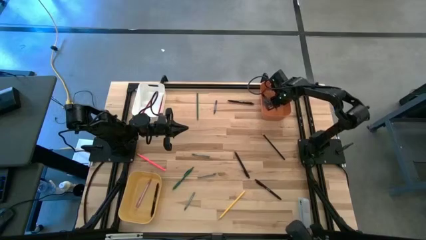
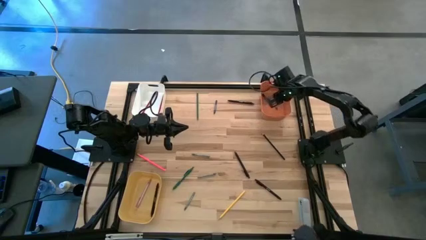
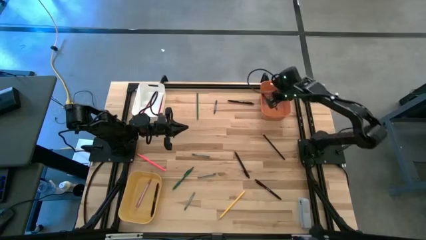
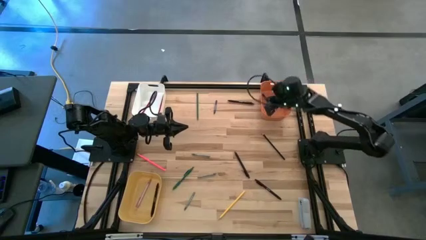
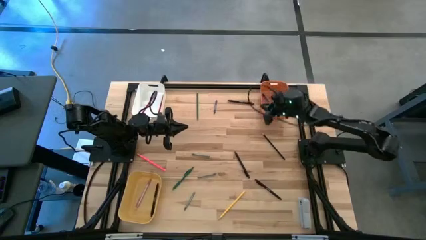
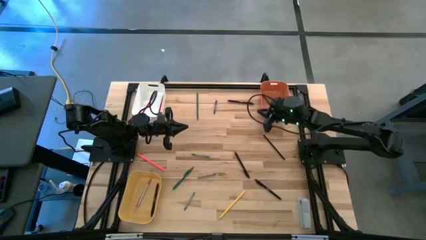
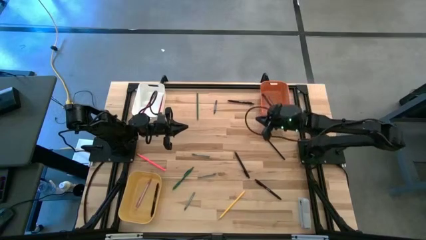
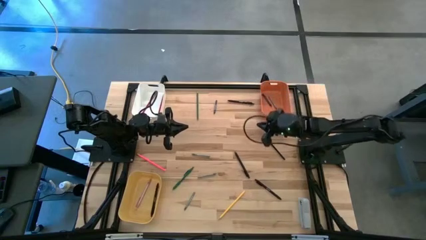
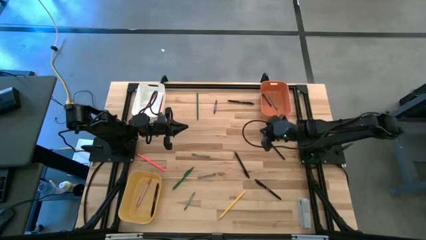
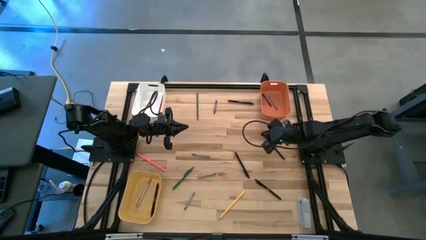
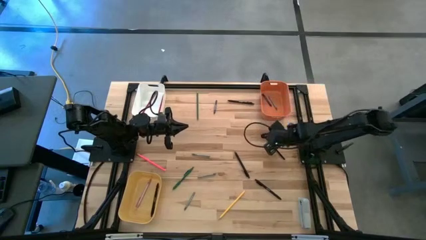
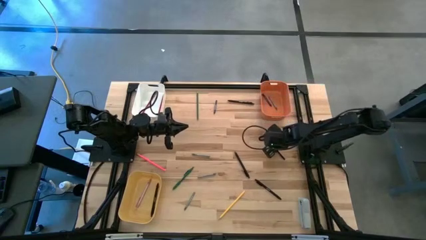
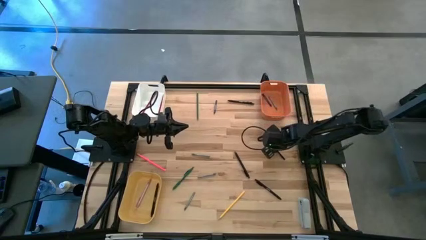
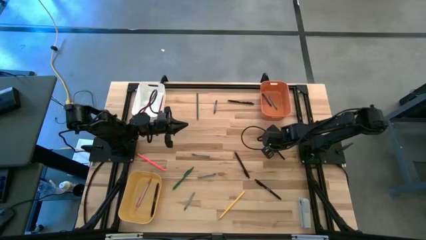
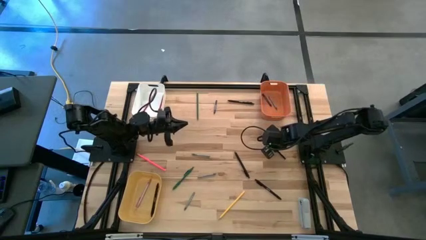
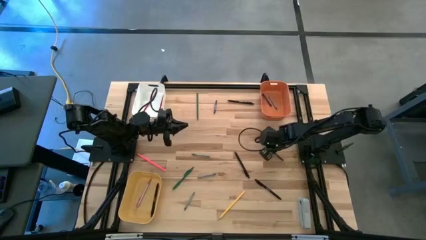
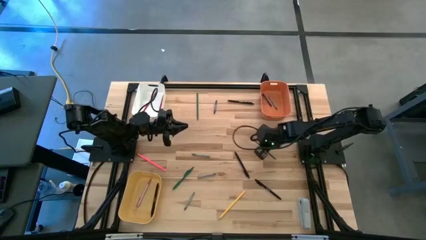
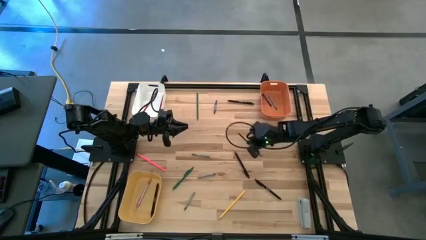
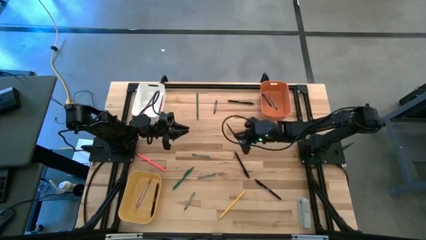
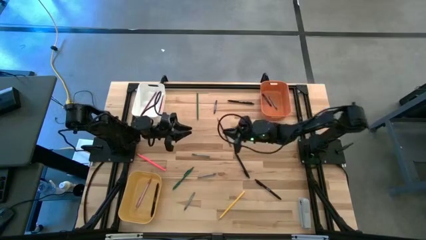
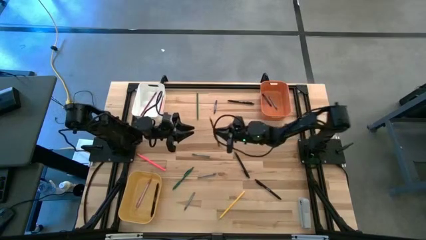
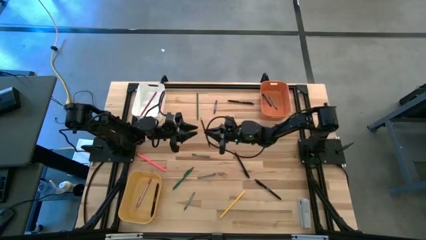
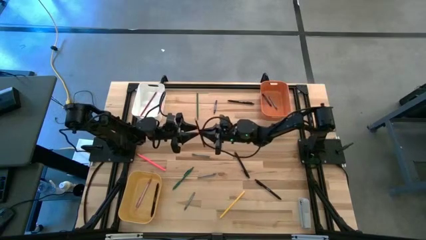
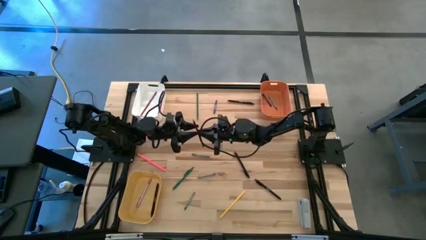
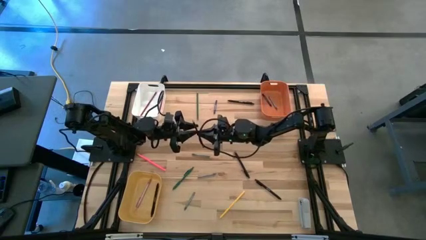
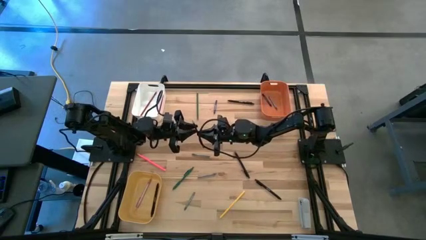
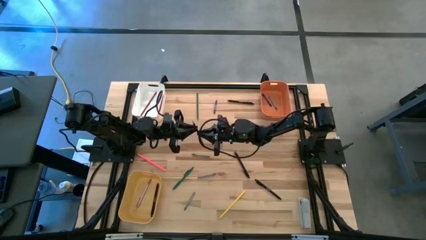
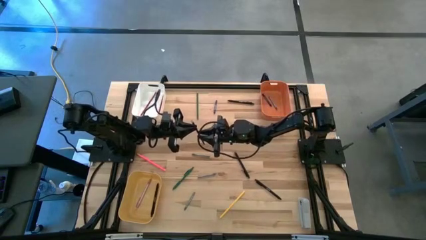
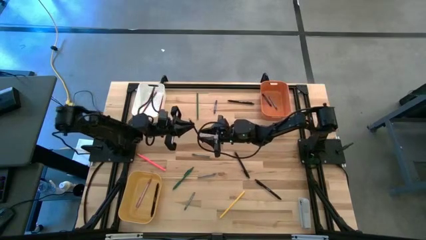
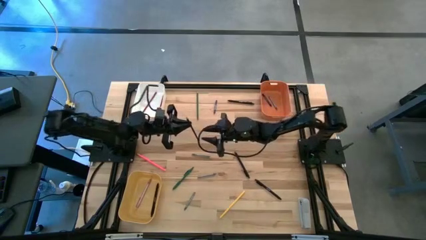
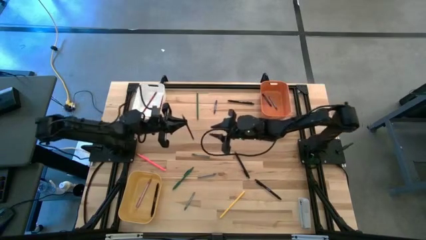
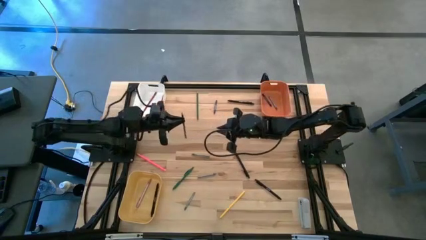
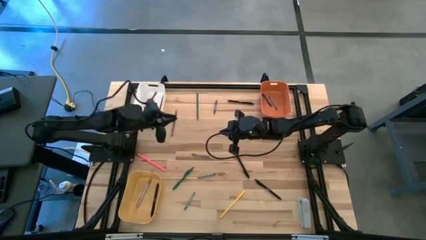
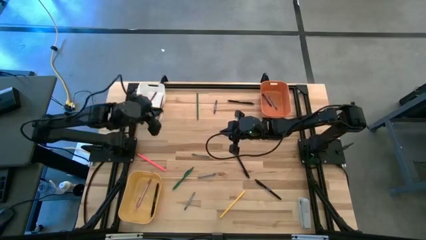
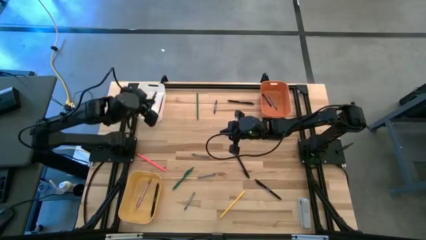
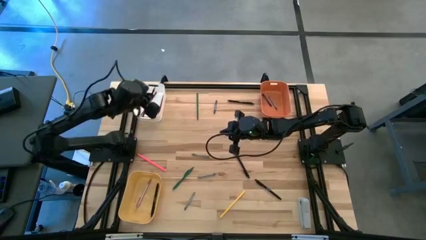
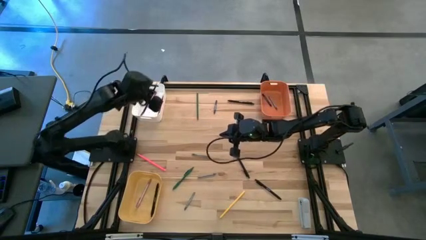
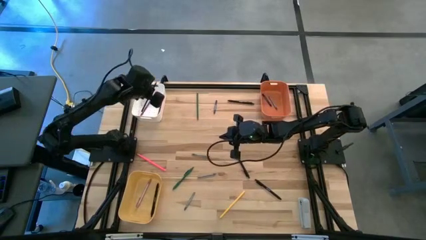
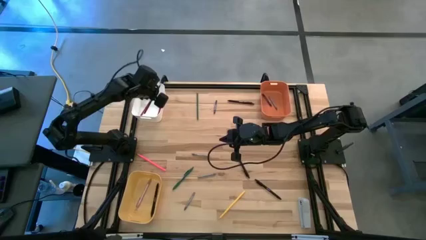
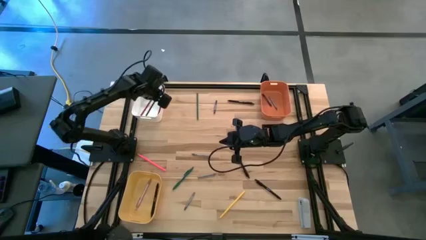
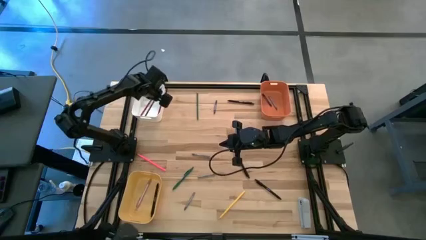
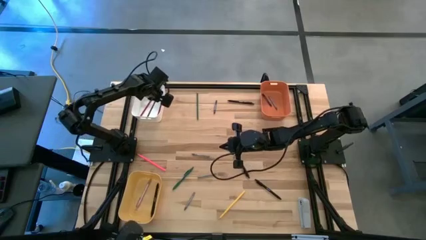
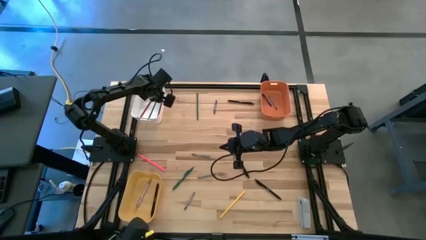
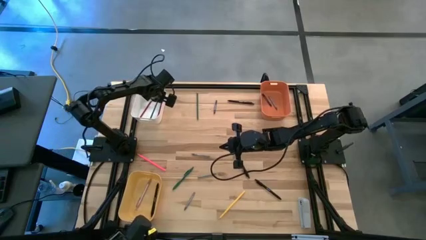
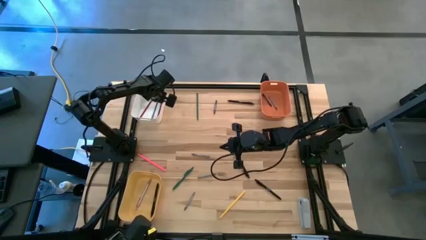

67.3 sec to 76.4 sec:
Task: Sort crayons/erasers/pens/pencils in bins
Put the black pencil into the white bin

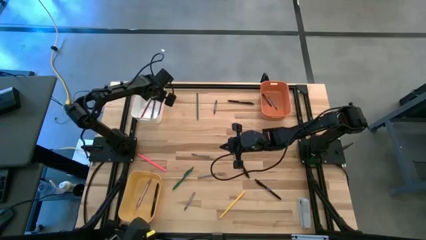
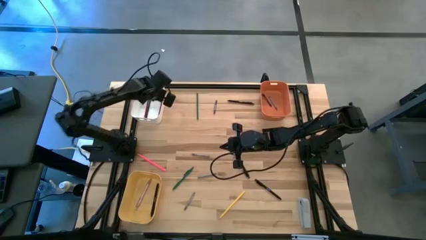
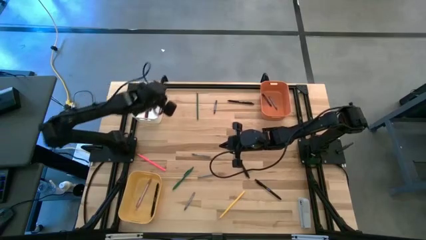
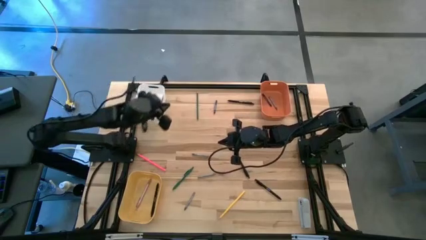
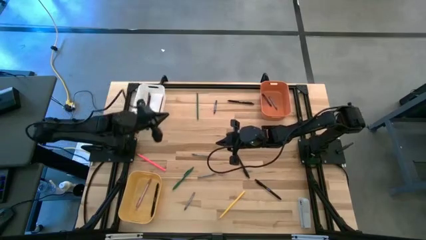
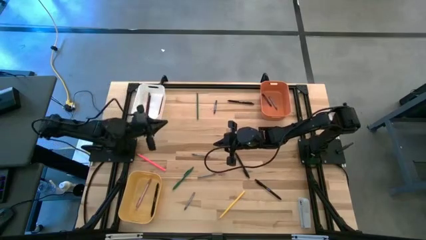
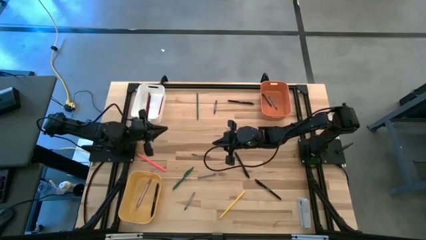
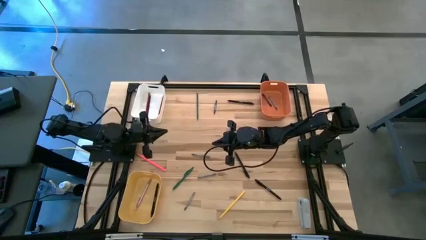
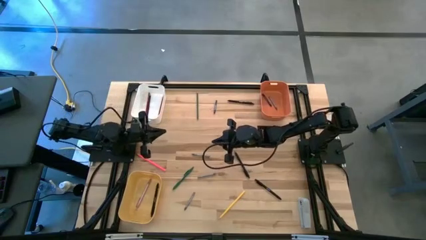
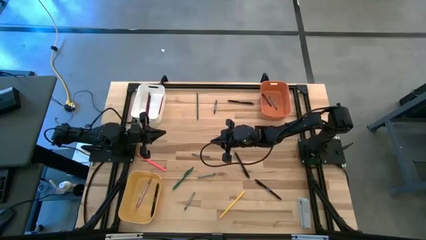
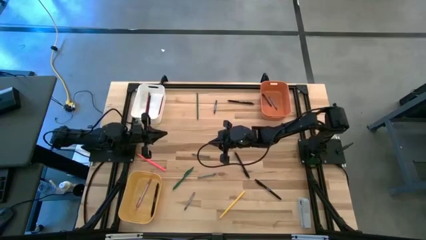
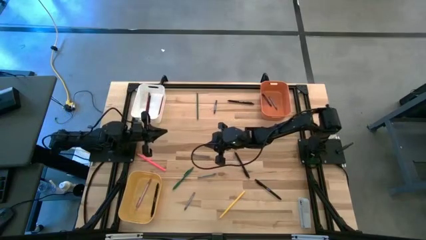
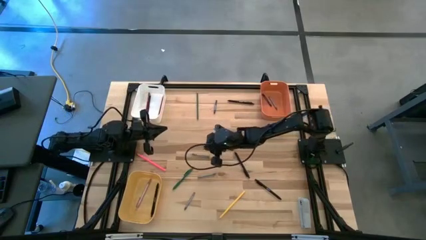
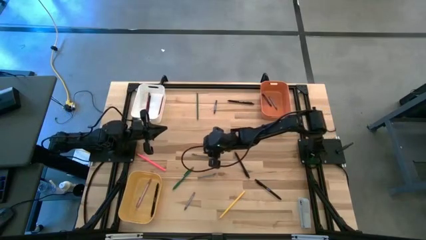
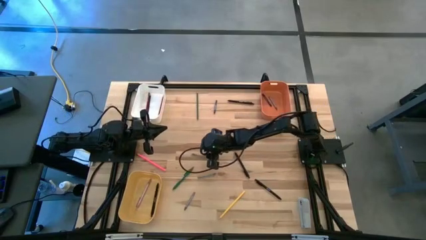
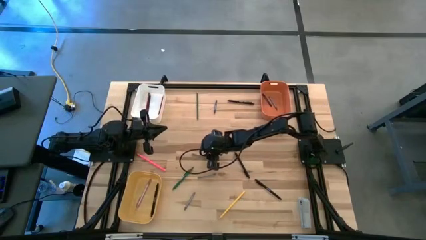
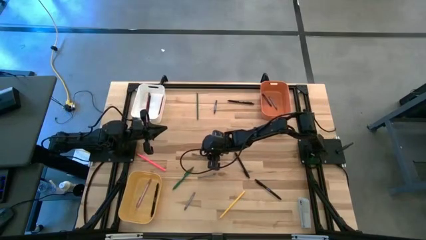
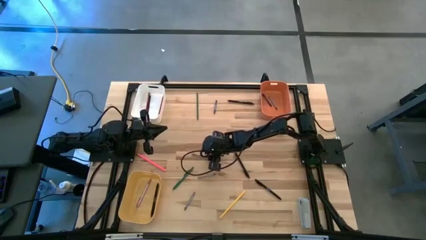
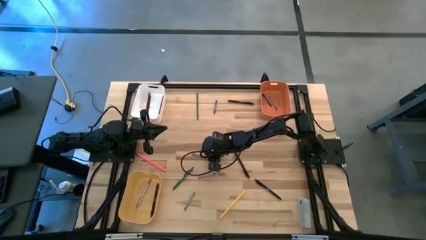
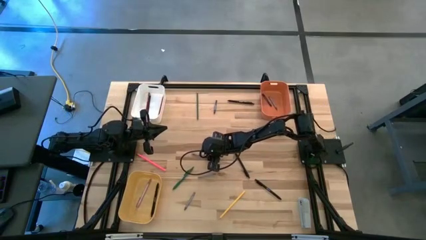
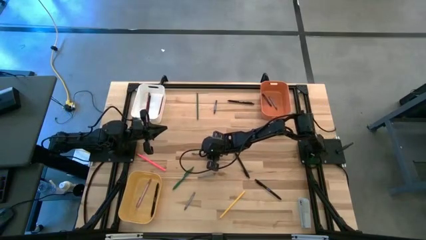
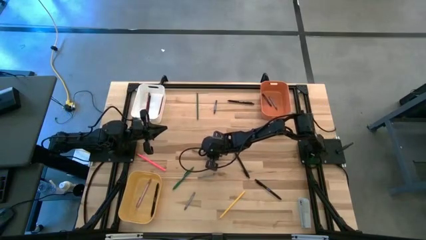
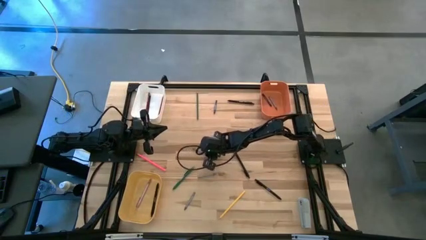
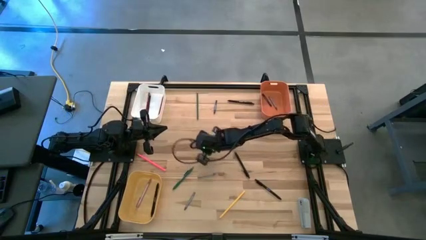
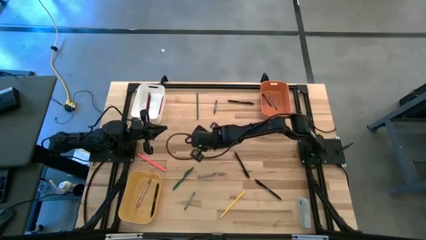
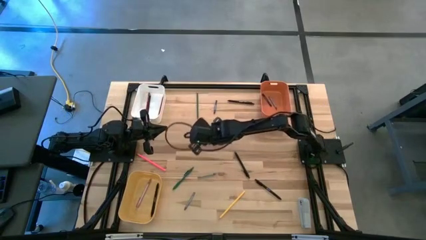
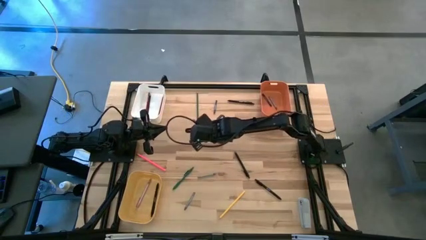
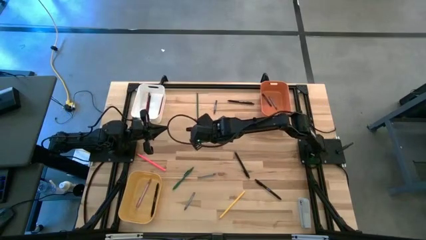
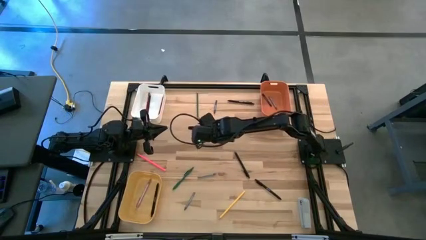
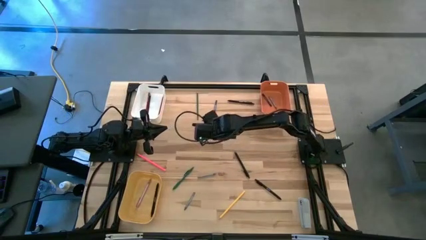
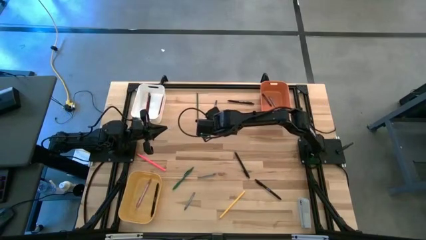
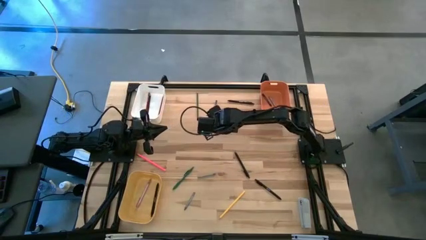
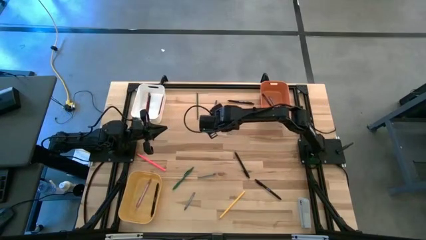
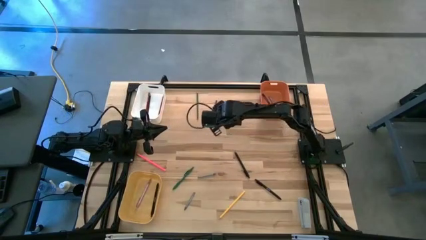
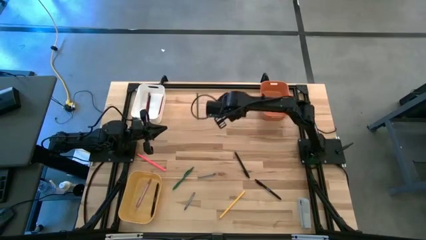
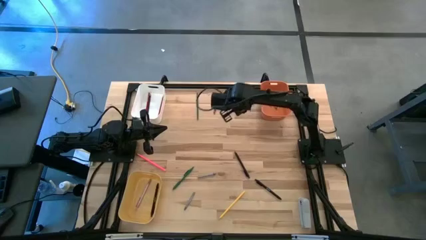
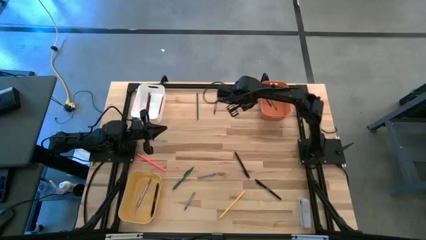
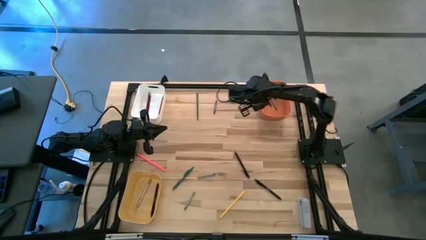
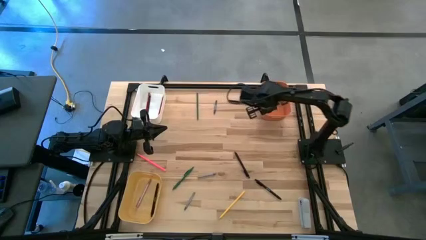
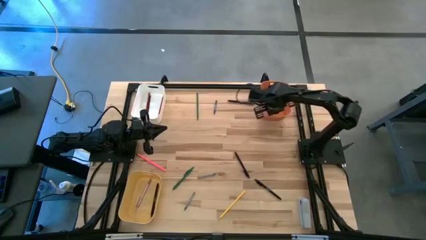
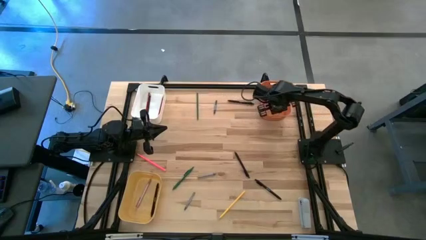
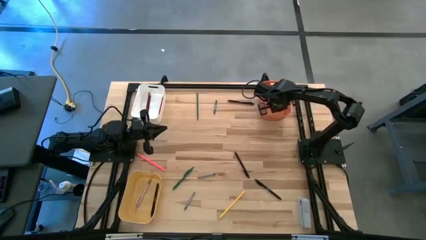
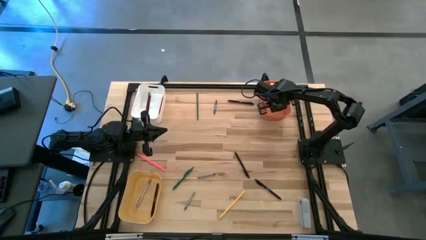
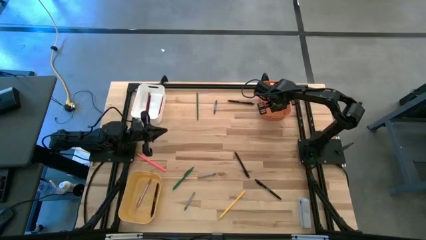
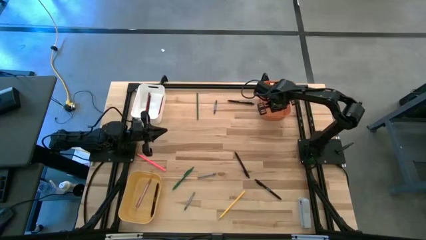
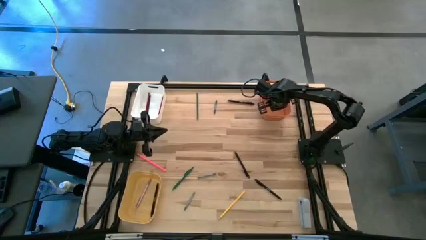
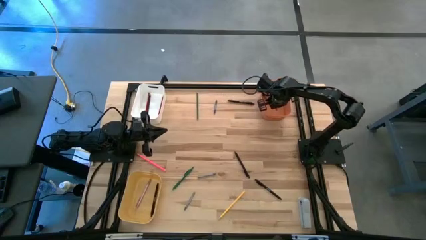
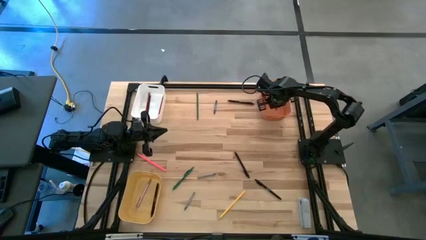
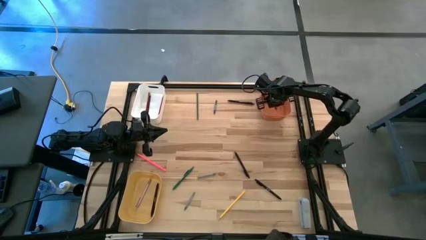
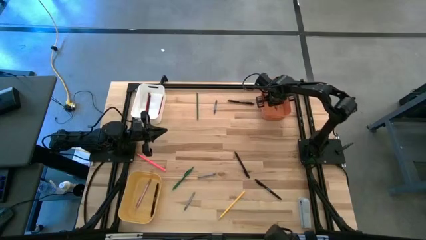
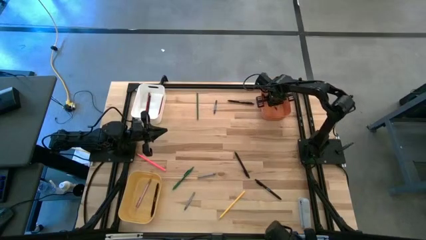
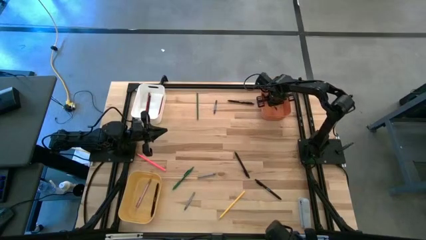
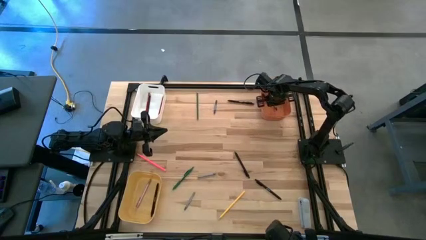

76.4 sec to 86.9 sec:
Put the top gray crayon into the orange bin
